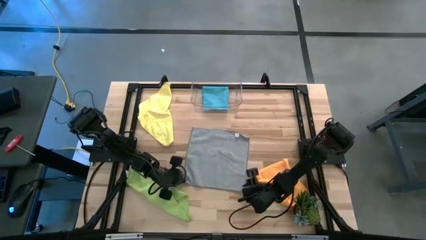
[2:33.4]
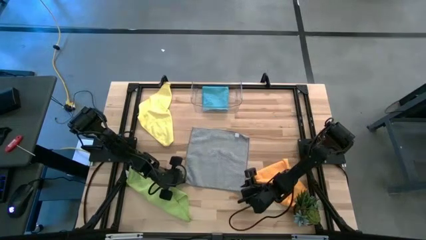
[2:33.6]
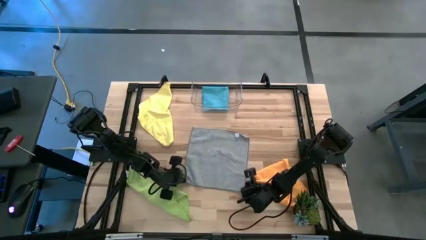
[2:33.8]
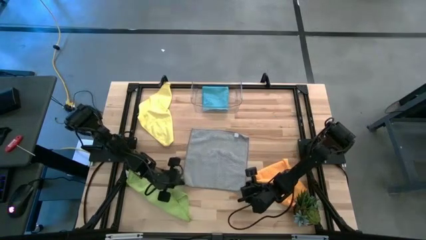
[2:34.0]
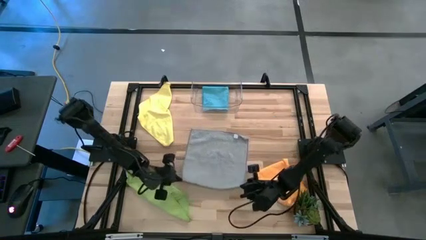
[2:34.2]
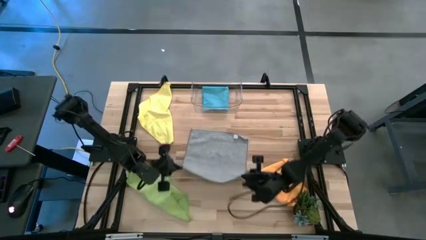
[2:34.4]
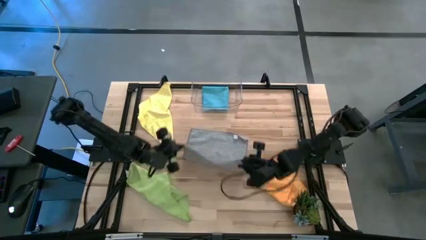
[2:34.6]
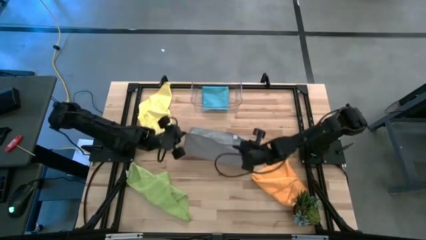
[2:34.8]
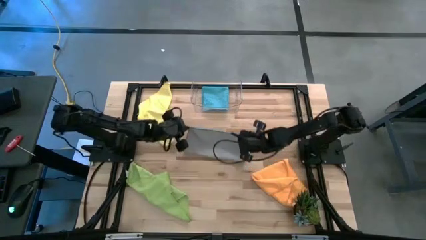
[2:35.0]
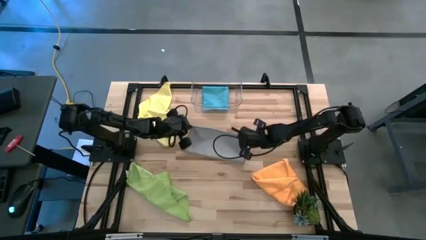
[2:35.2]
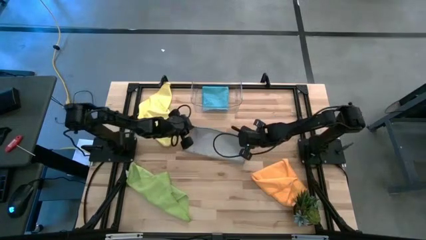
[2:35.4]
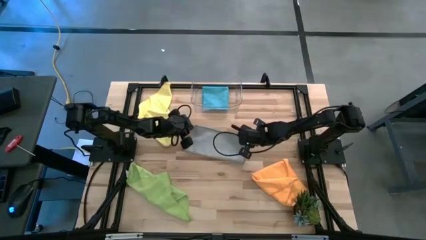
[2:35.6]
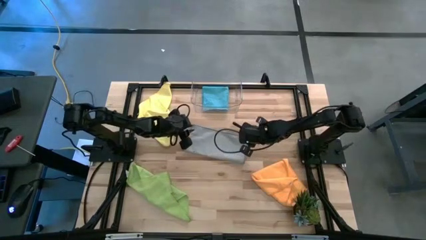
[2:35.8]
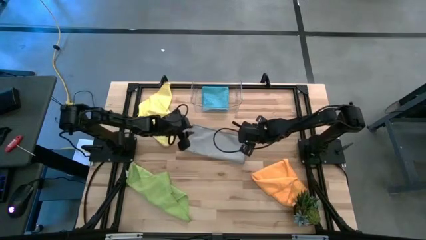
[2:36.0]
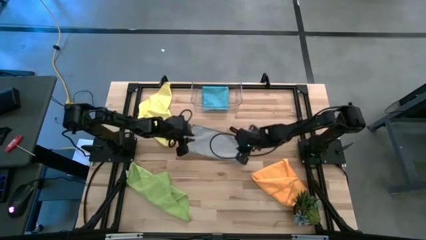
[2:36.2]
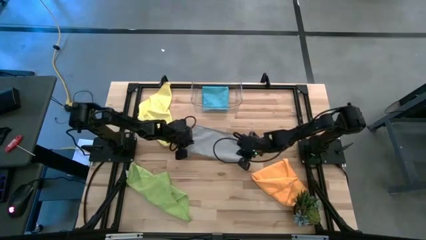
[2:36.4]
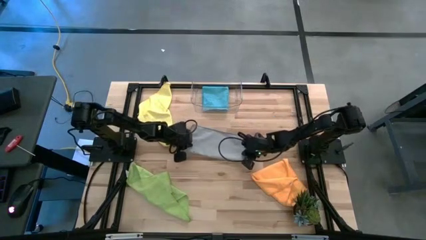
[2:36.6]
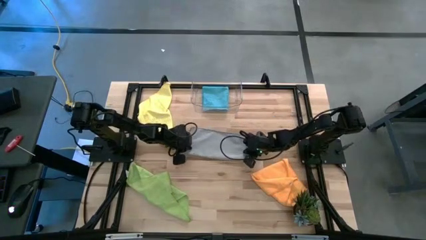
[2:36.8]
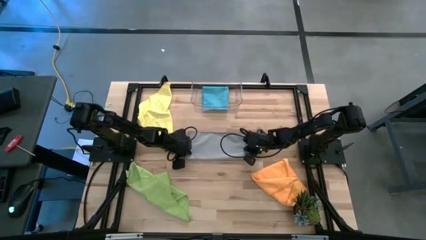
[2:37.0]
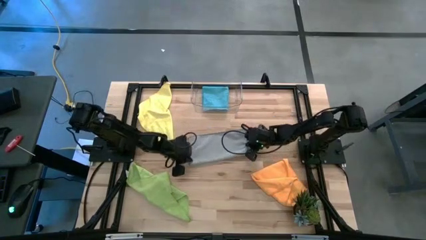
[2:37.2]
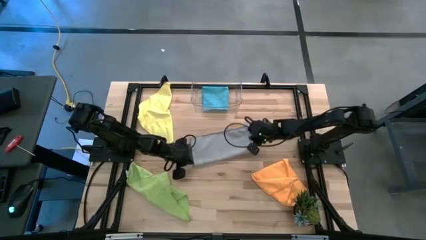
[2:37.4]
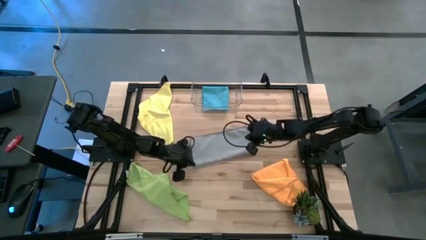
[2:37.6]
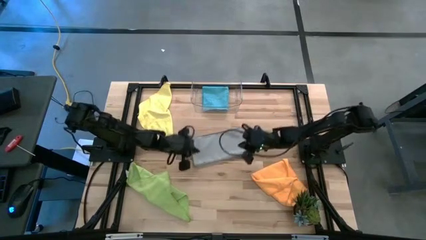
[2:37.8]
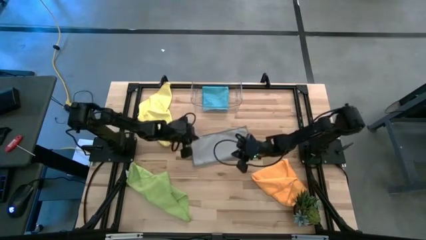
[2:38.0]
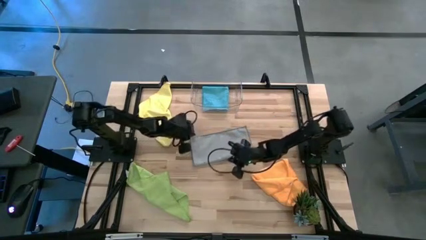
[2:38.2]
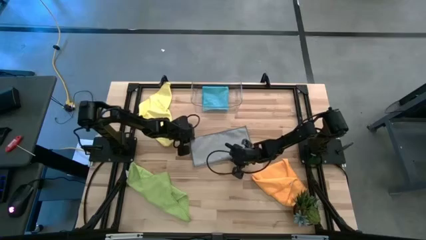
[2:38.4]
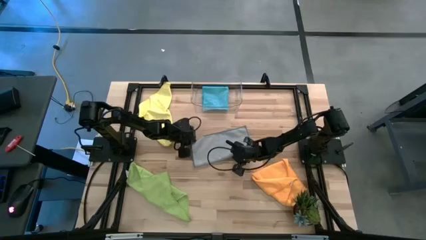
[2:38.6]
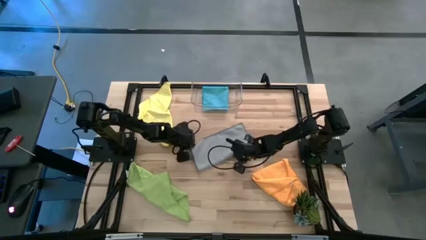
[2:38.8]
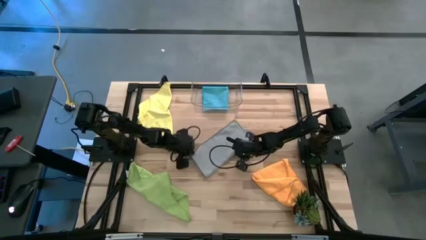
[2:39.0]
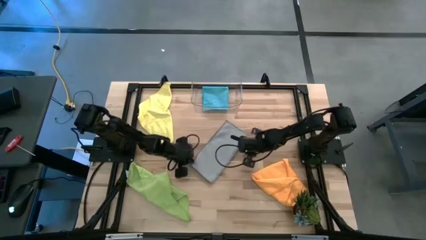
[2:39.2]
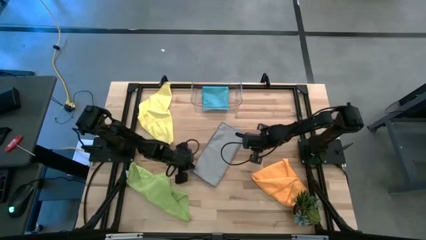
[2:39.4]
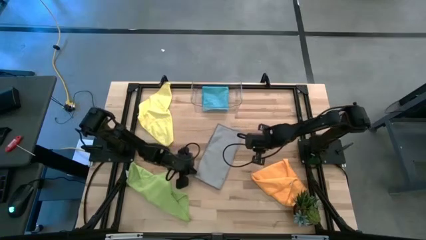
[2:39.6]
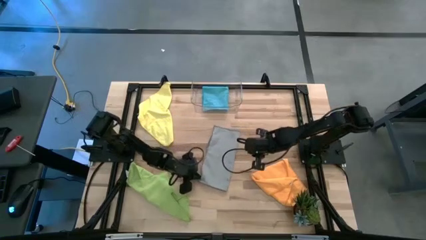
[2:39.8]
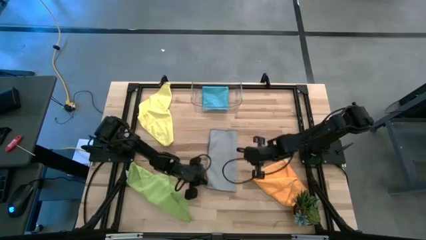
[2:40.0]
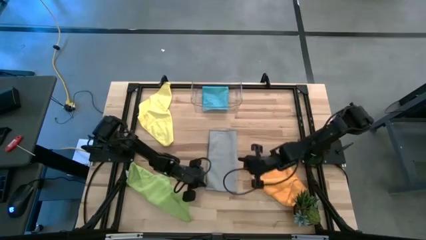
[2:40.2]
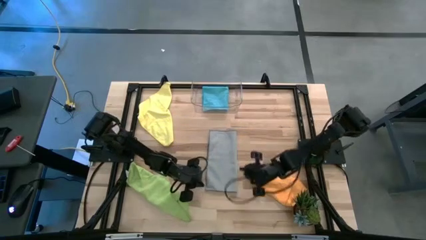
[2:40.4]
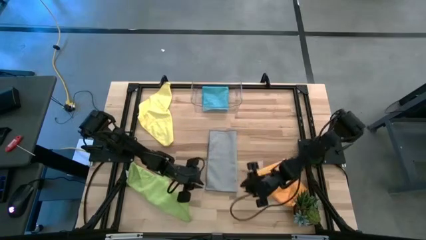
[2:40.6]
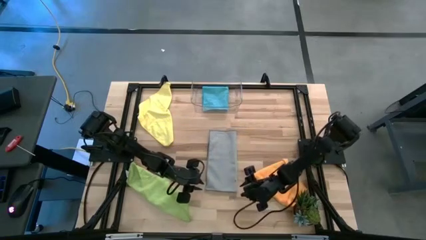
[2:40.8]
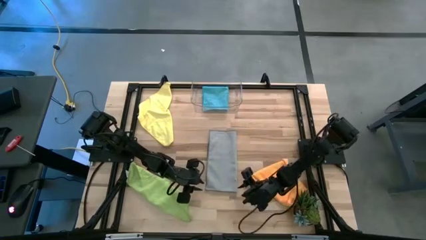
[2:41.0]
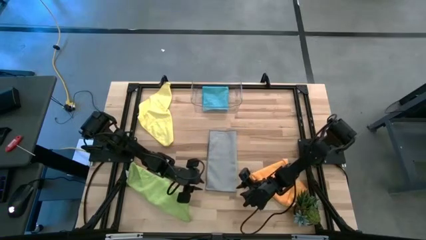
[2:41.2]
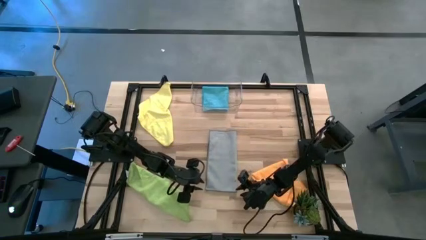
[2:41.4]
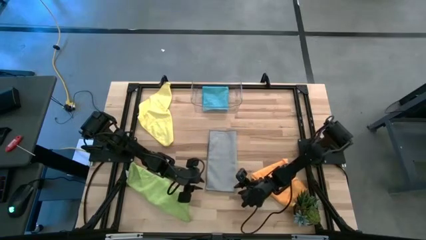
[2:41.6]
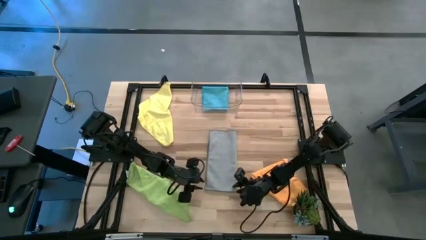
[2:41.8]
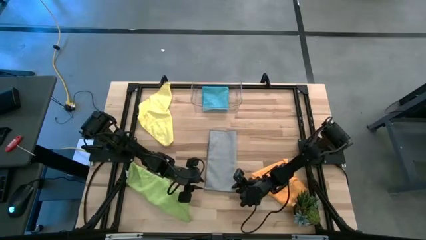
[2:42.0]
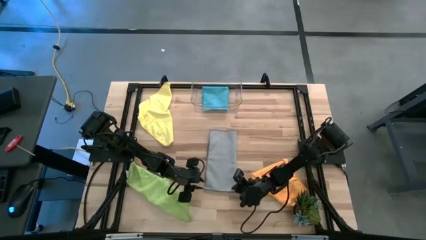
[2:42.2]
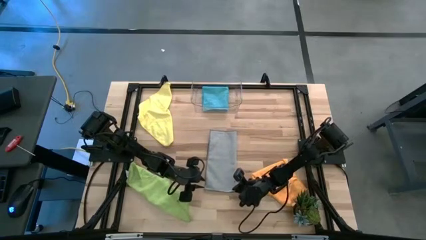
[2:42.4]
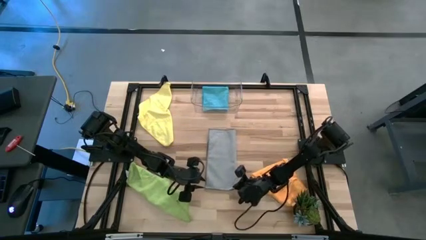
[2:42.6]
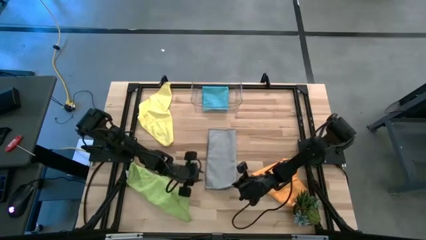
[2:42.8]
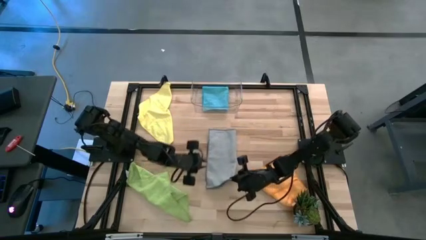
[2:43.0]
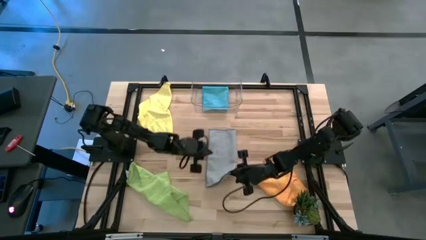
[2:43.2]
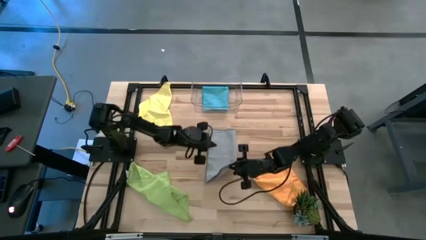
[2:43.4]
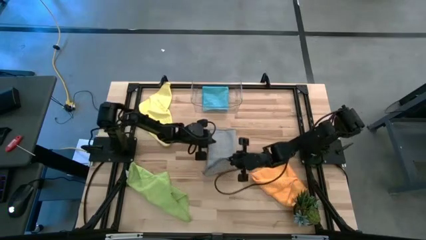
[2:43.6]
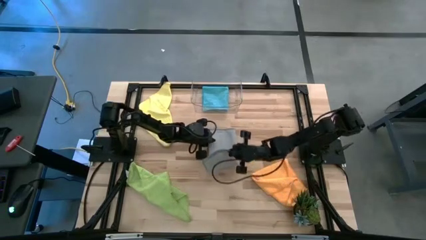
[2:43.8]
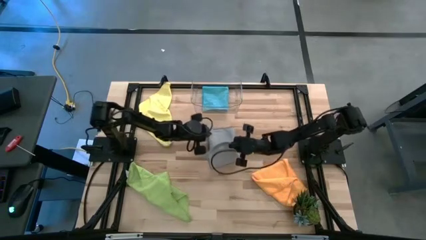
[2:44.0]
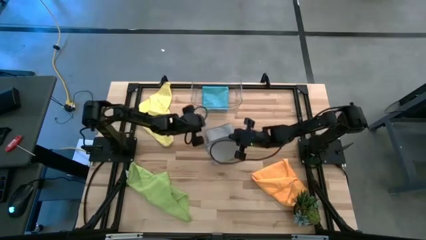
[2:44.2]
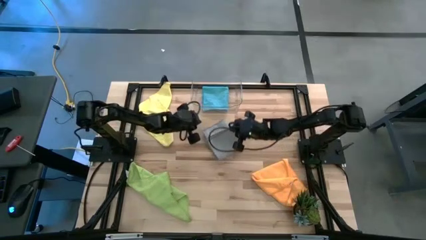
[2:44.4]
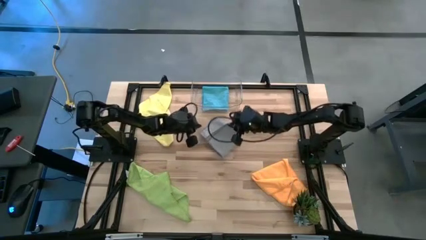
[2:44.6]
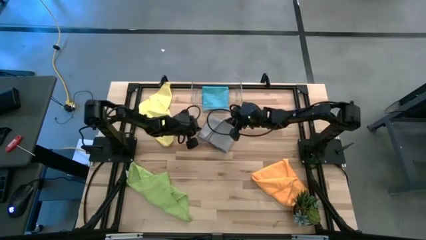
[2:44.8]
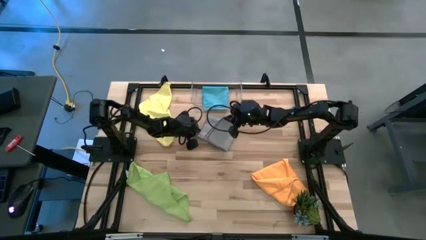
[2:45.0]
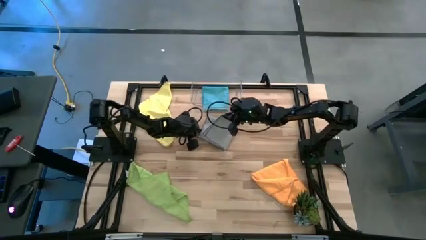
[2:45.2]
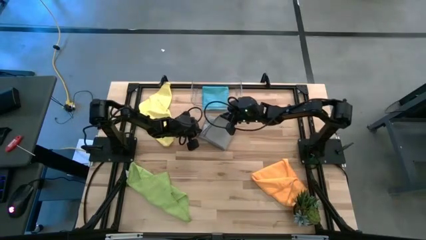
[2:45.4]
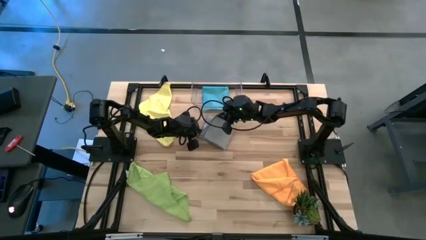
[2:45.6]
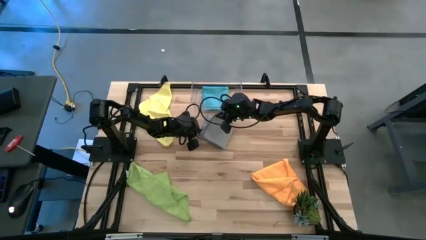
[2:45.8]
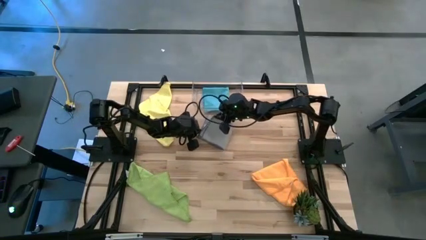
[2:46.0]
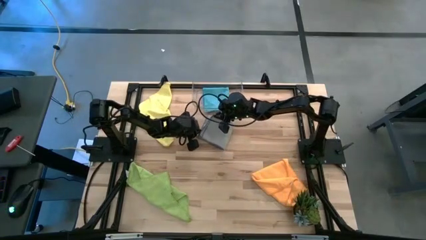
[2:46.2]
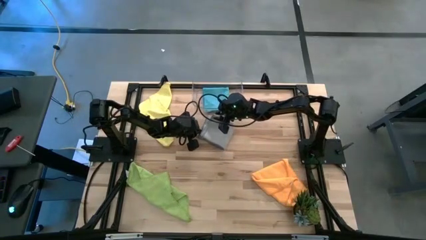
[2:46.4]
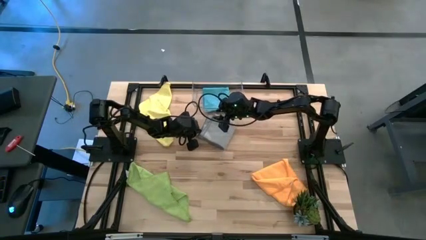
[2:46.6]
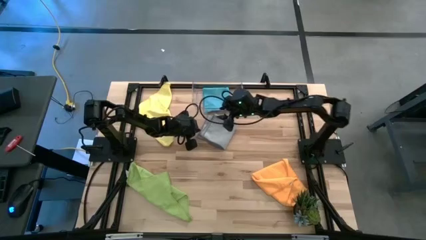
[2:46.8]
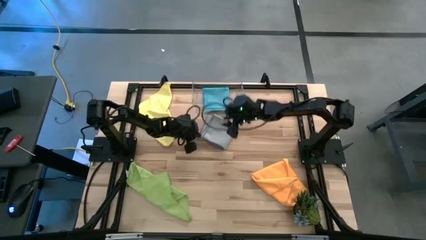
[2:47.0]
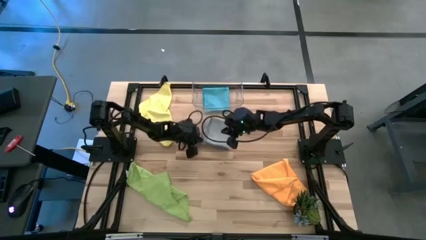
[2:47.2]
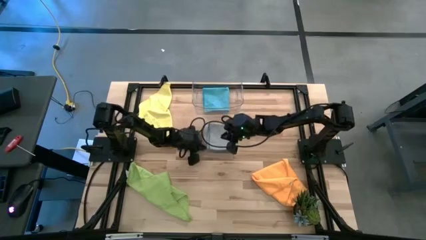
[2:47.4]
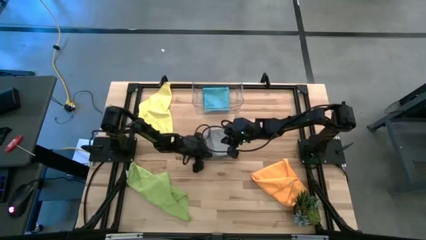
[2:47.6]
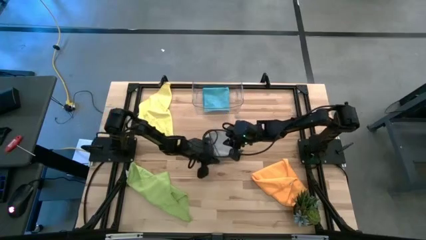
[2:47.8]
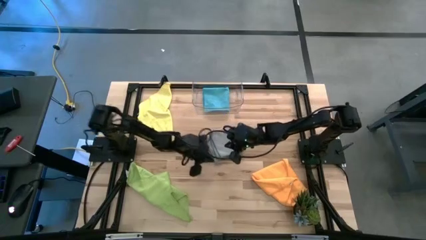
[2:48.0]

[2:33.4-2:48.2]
Task: Fold microfiber towels
Fold the gray towel
